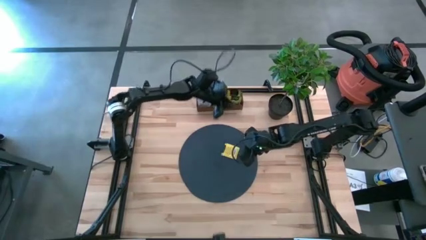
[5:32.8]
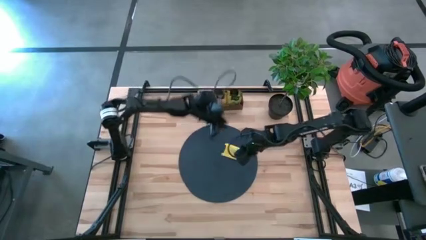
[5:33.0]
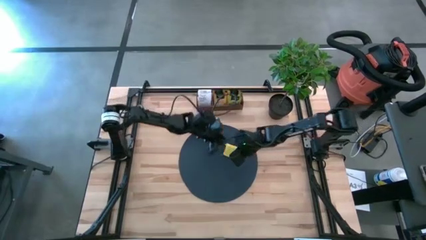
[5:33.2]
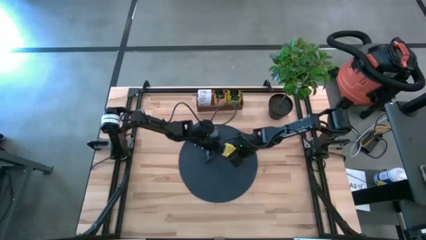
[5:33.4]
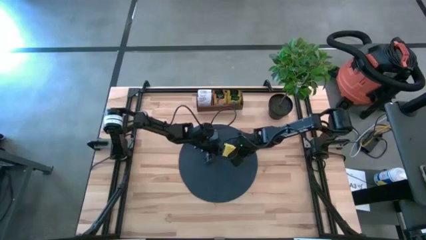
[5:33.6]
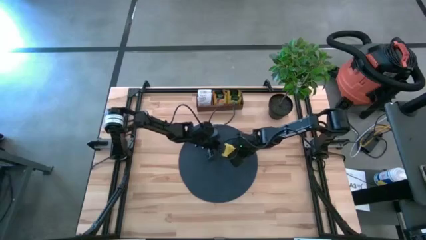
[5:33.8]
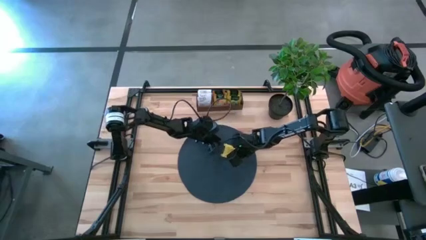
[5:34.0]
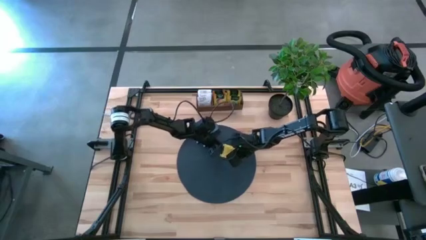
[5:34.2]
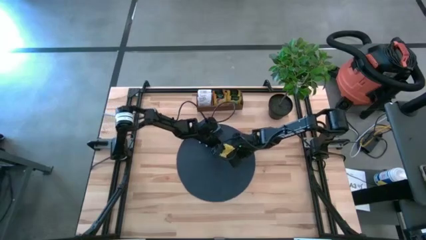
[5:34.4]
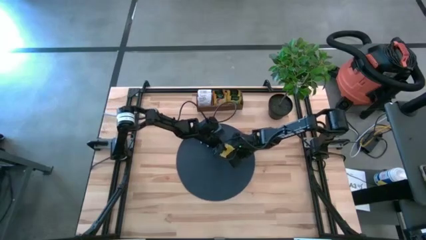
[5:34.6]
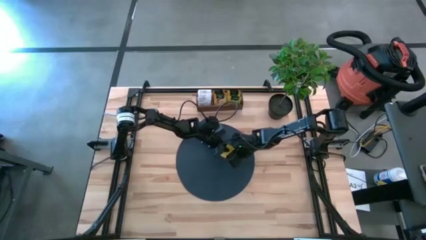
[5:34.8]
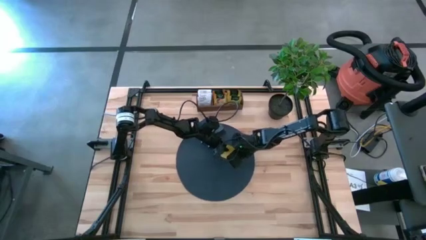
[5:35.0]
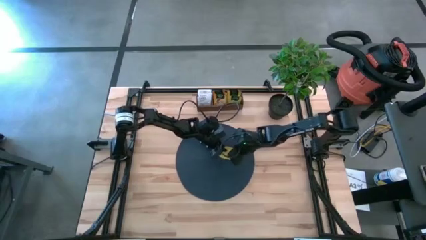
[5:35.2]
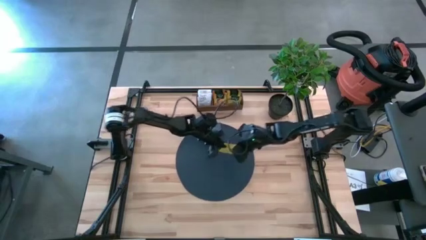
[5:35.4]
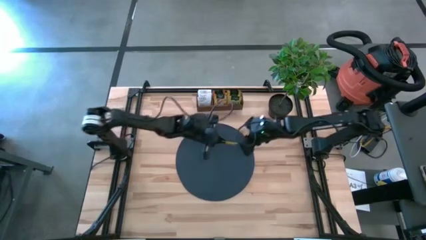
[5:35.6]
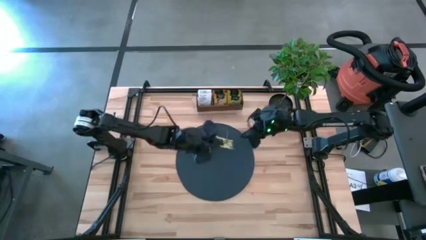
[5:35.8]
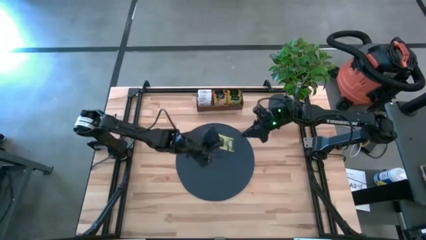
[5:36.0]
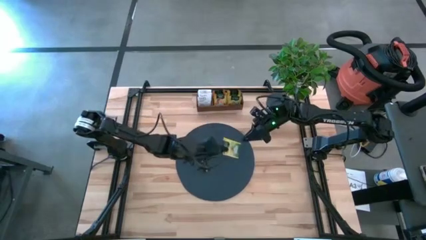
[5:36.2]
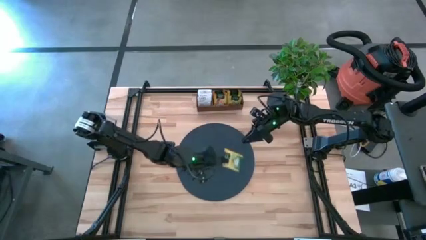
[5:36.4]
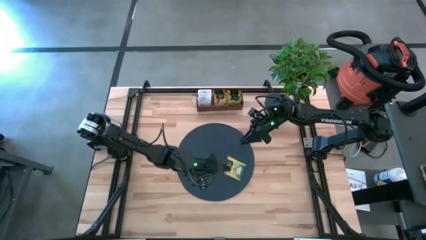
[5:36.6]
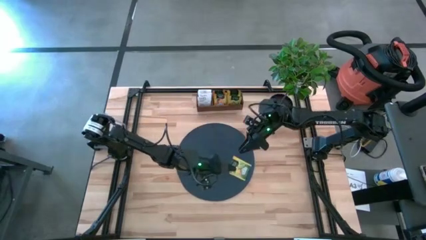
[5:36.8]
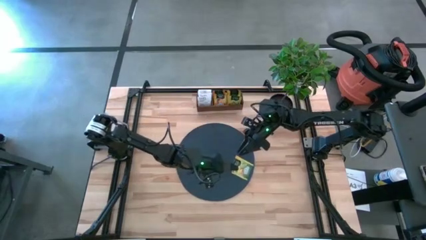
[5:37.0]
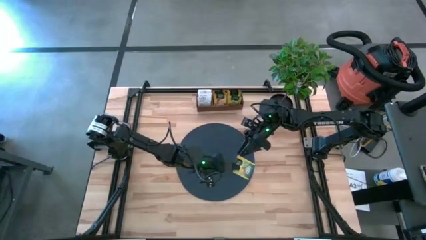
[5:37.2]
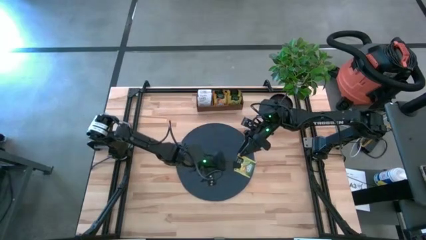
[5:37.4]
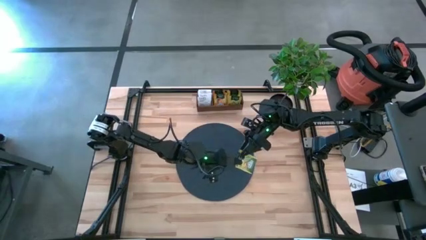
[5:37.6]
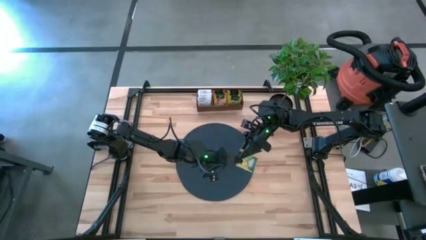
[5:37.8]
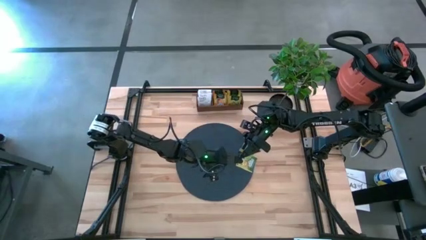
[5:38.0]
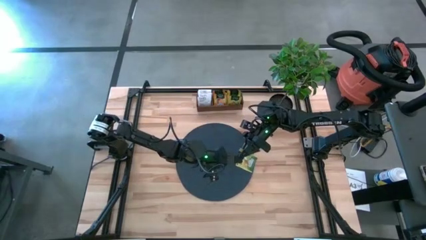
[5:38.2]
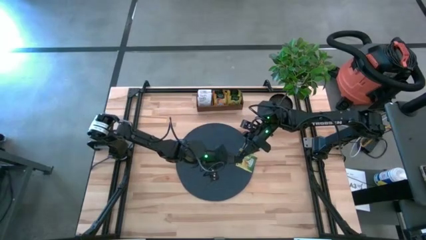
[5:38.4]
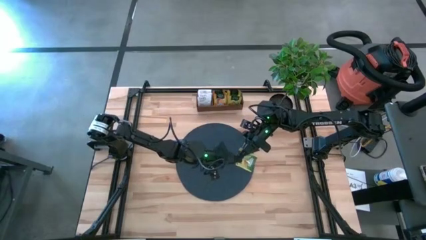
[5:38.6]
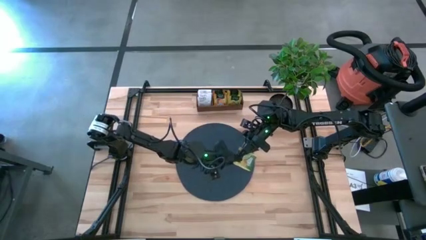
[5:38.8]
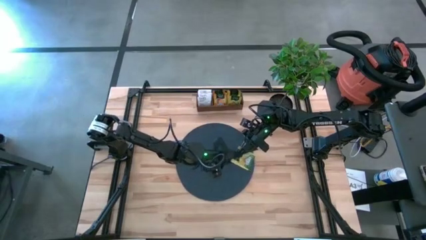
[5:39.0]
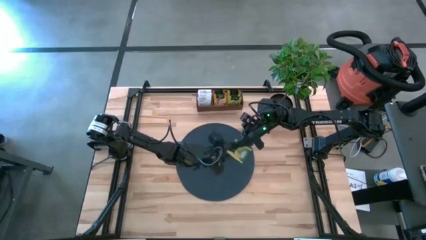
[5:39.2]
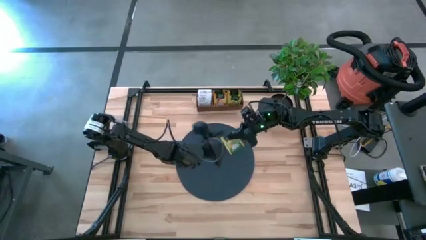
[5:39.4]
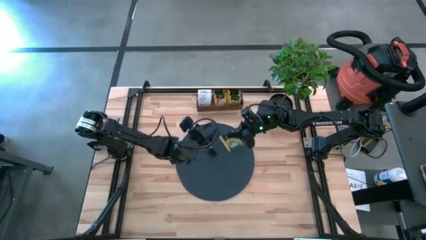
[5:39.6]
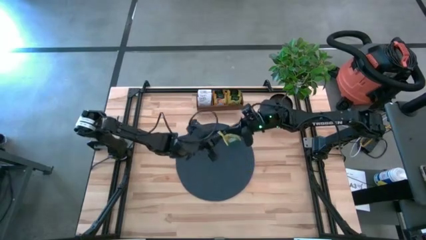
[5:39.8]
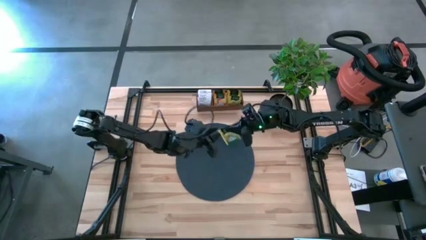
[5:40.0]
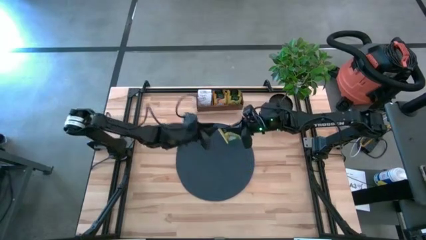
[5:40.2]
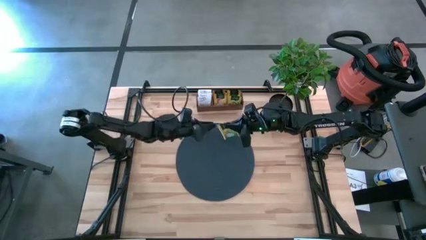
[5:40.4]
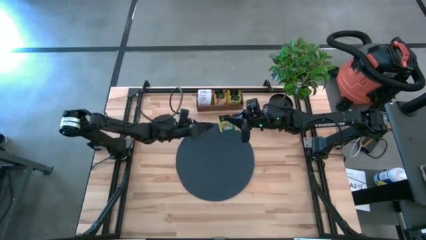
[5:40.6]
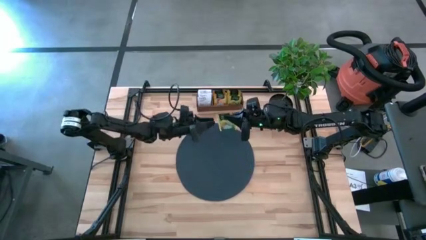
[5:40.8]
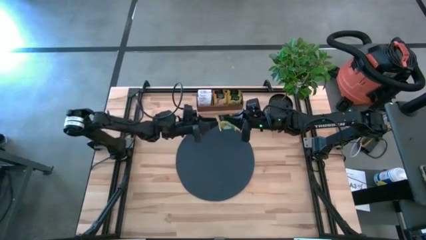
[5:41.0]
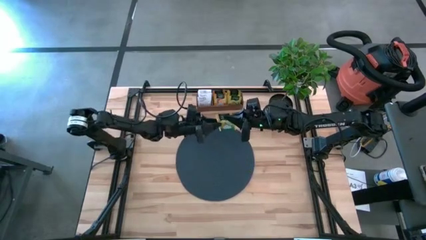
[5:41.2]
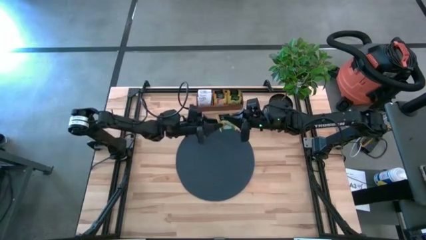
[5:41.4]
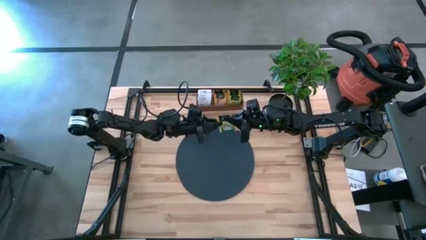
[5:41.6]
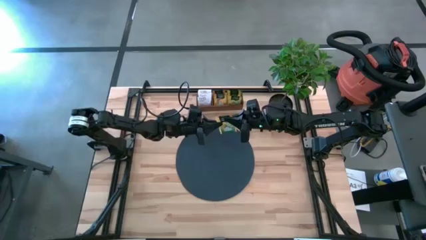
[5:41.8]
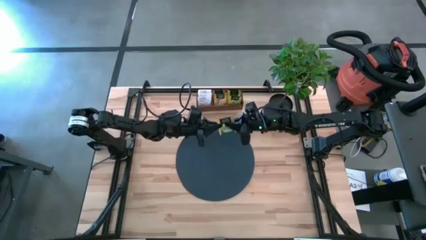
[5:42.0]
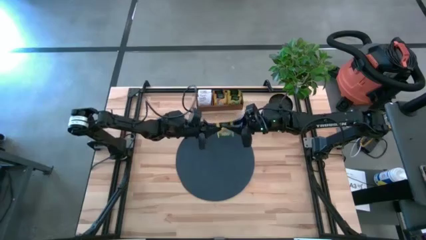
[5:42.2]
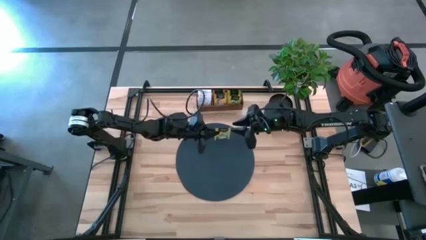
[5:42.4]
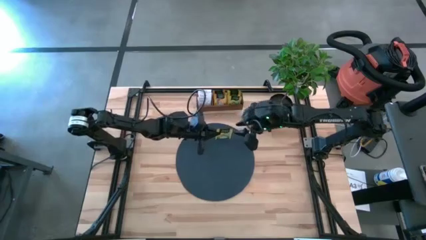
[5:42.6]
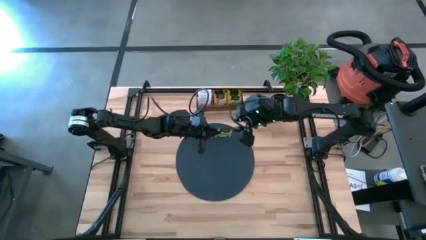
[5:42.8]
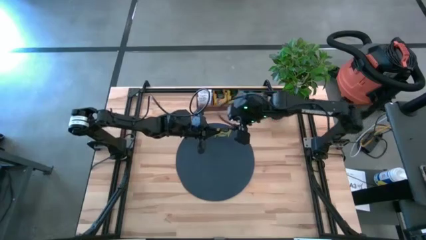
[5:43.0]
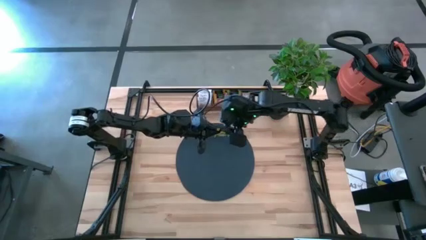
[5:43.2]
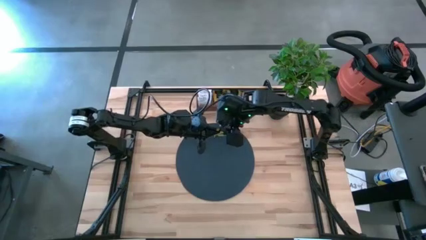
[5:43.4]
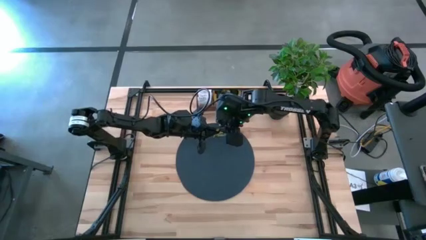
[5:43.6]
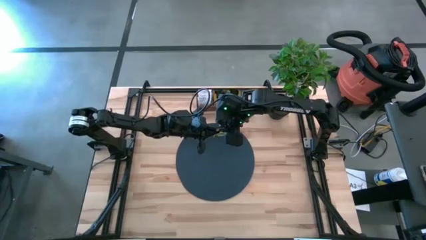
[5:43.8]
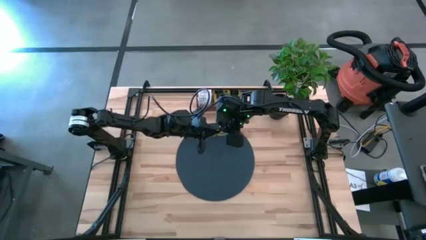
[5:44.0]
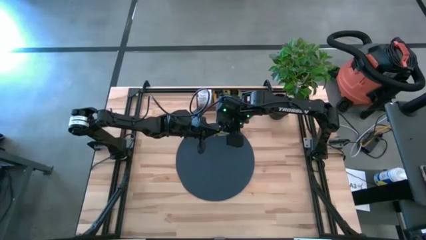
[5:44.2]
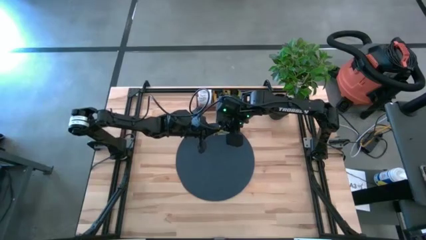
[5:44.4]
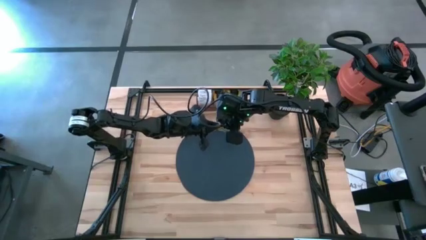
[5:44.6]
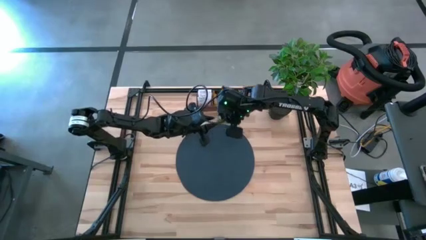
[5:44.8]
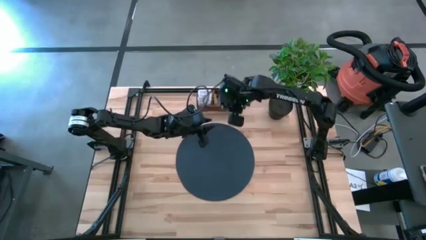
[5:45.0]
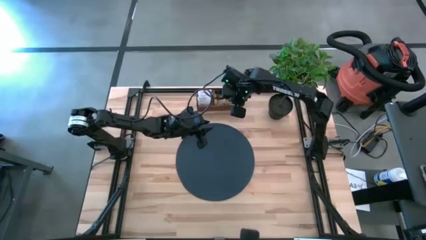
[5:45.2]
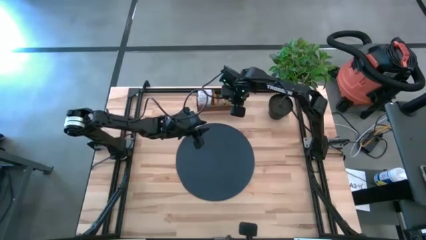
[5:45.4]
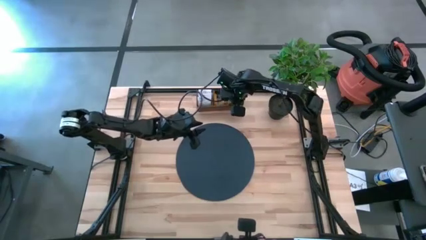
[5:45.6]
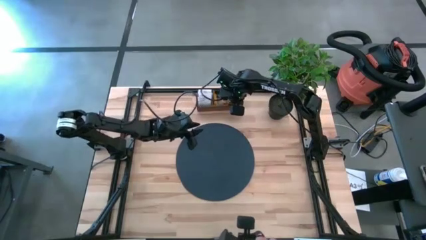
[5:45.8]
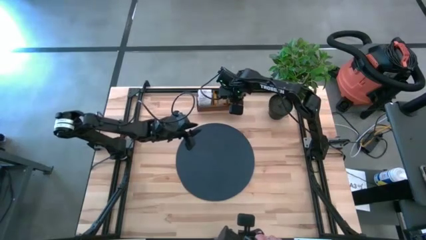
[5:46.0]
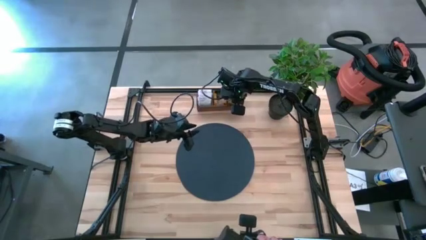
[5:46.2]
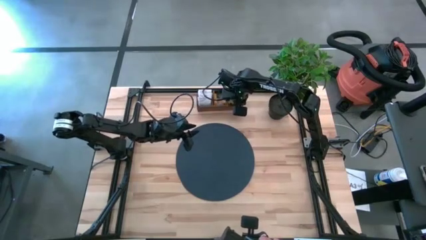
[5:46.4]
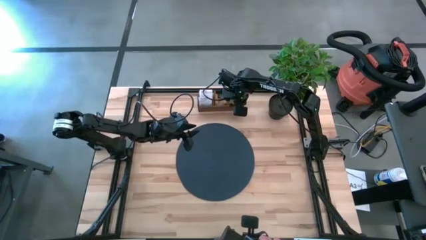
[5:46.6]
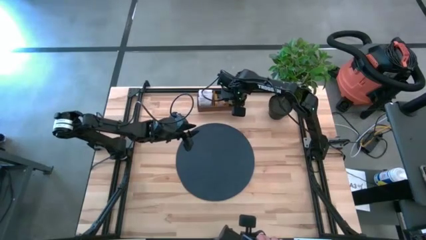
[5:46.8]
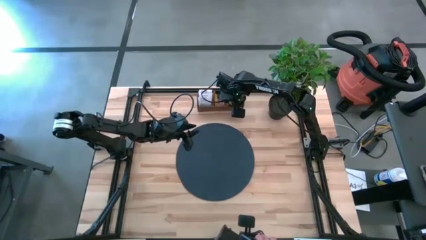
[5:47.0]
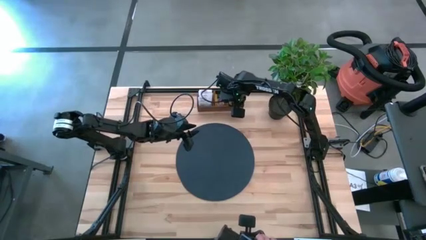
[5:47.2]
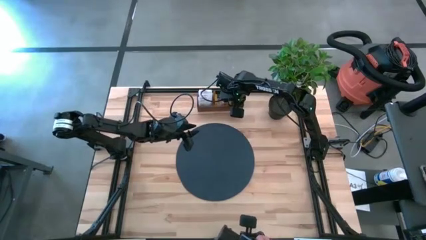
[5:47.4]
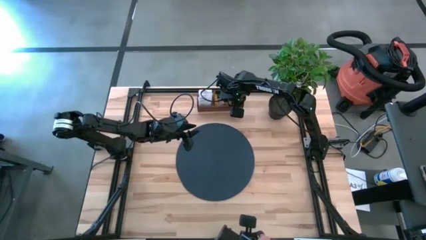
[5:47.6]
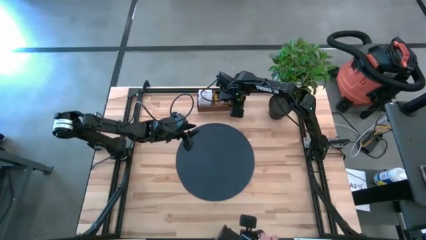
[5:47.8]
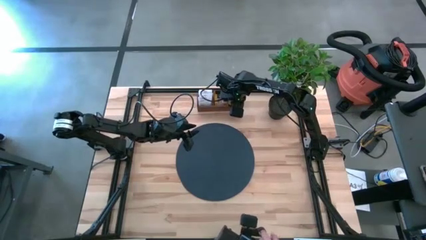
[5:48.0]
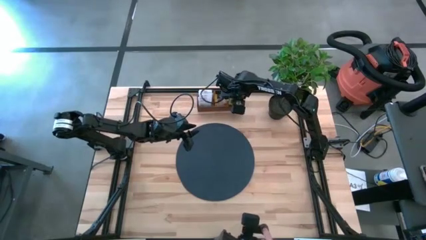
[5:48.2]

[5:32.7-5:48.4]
Task: Pick & Place Tea
Put the green tea bag into the right section of the wooden organizer

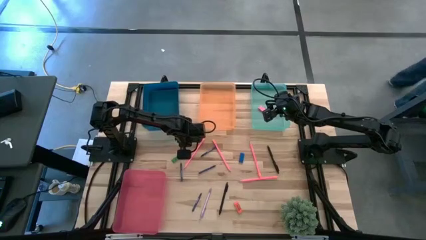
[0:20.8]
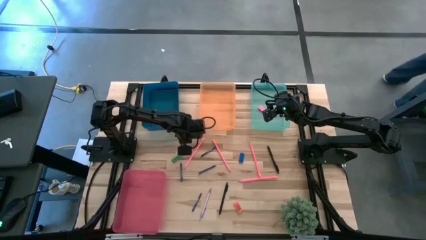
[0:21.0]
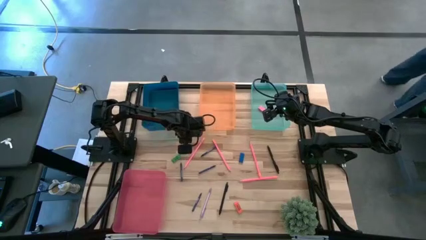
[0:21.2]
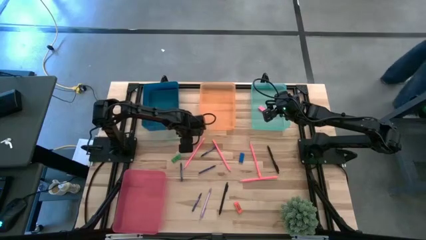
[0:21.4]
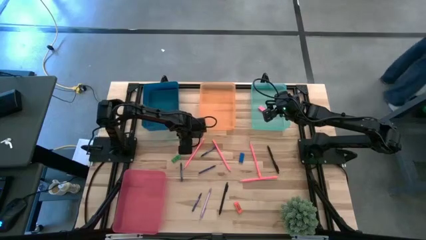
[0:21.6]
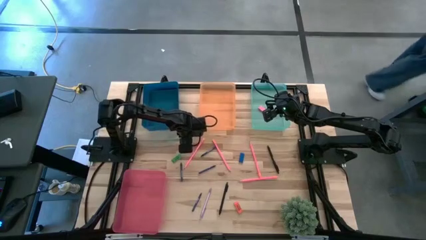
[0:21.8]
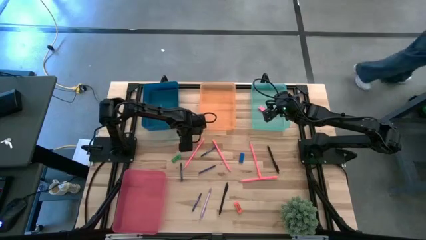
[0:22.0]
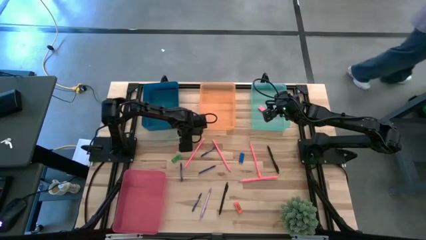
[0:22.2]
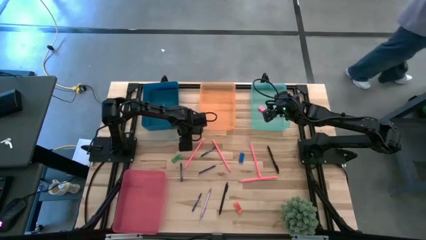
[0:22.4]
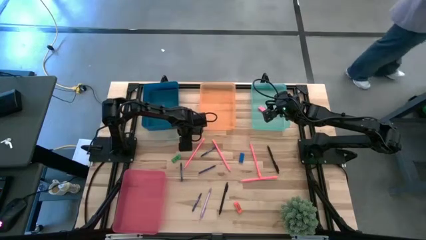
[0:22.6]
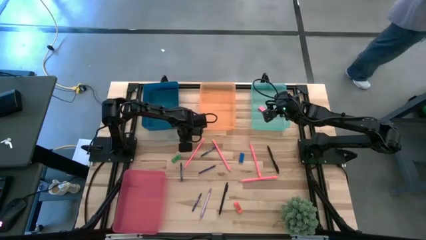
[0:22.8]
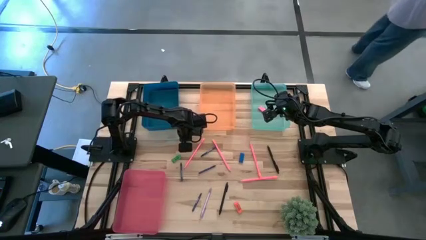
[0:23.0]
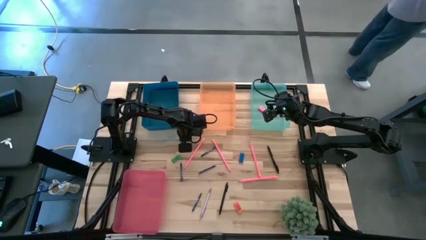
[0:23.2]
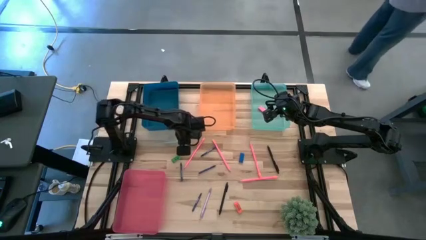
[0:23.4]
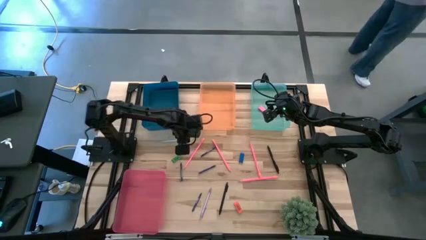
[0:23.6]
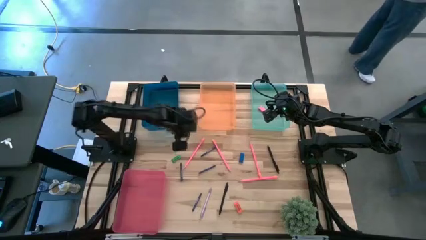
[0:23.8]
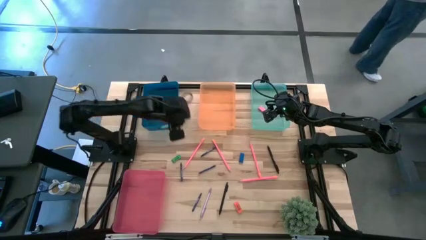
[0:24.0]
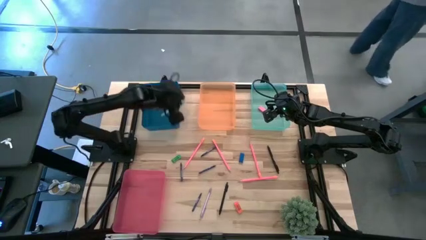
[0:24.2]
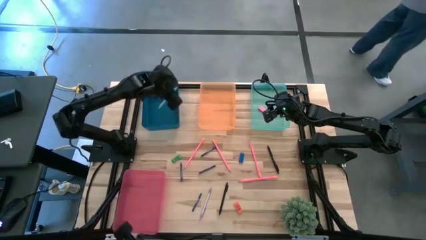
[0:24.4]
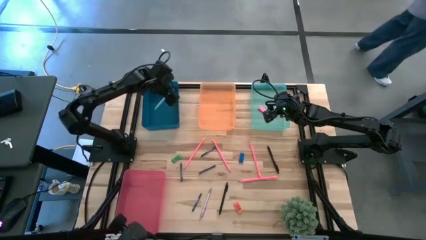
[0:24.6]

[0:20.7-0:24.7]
Task: Sort crayons/erasers/pens/pencils in bins
Put the blue pen into the blue bin
